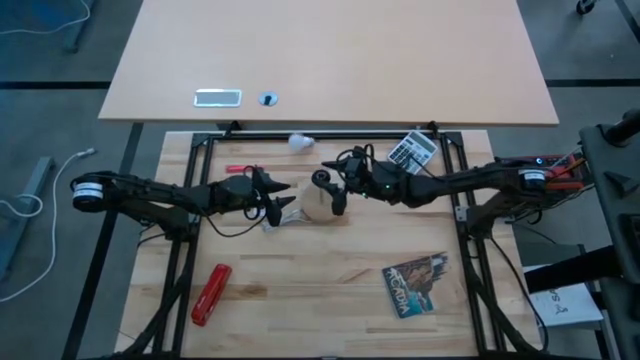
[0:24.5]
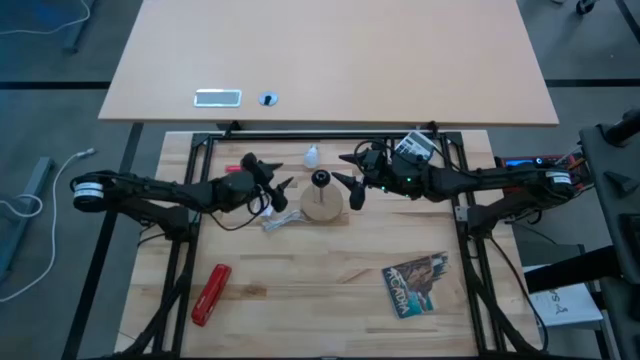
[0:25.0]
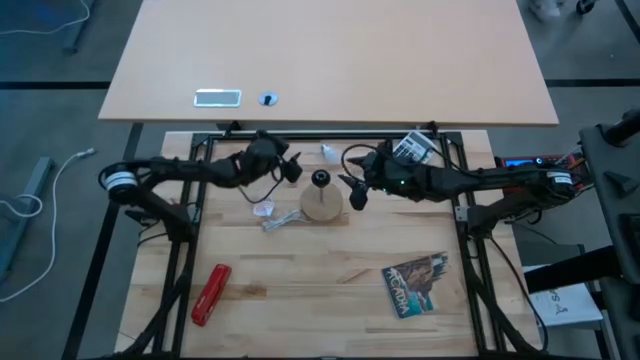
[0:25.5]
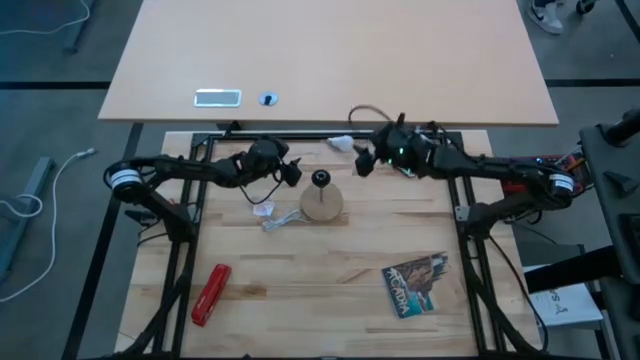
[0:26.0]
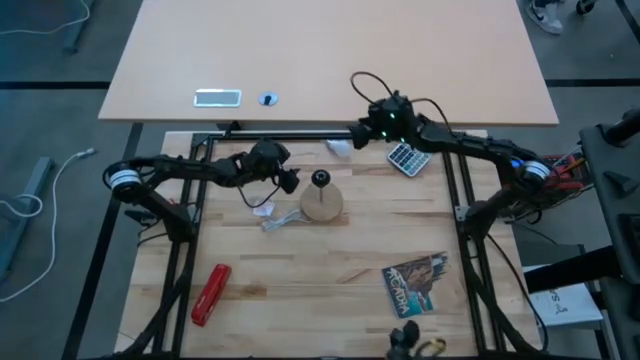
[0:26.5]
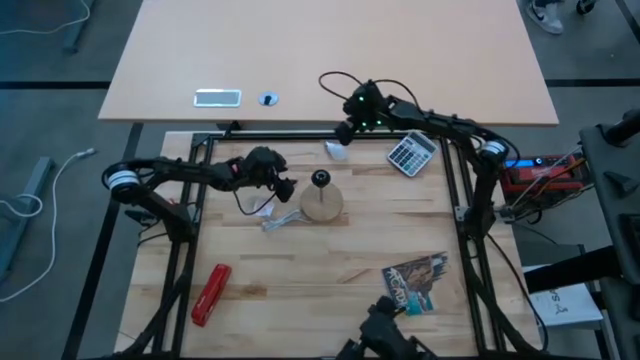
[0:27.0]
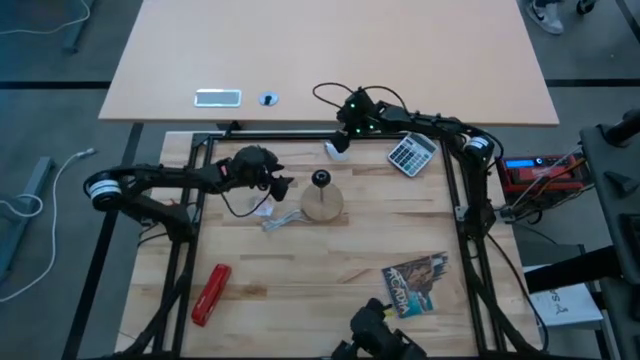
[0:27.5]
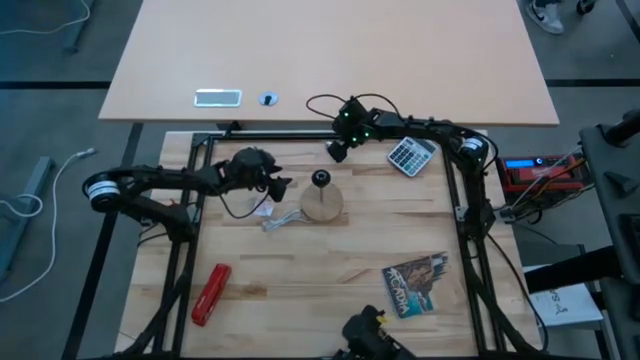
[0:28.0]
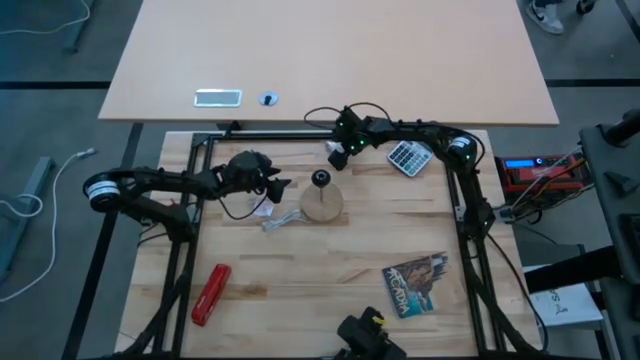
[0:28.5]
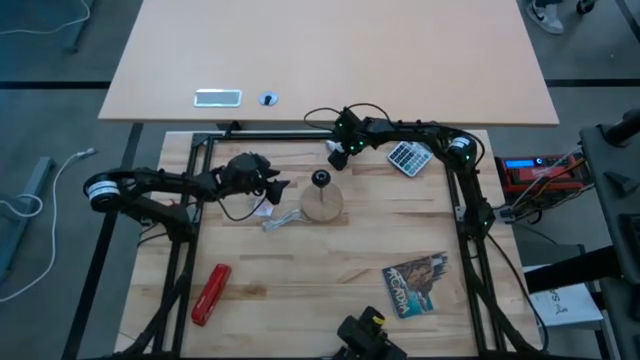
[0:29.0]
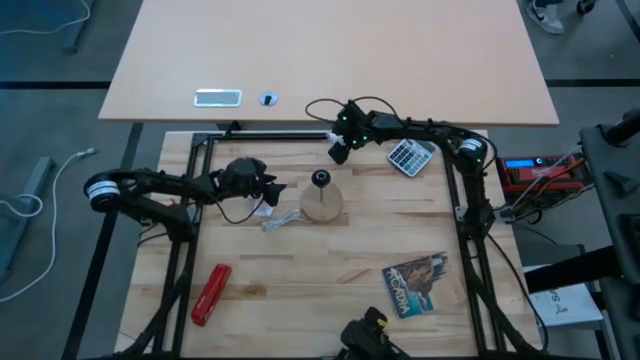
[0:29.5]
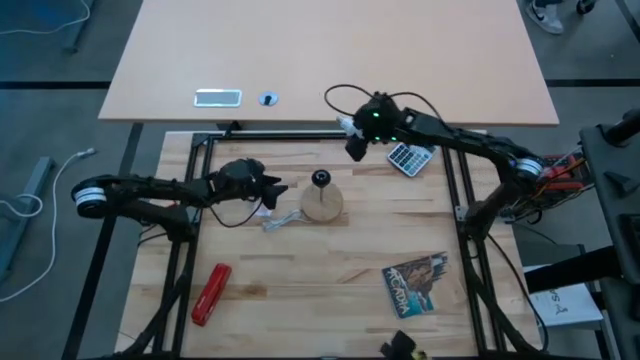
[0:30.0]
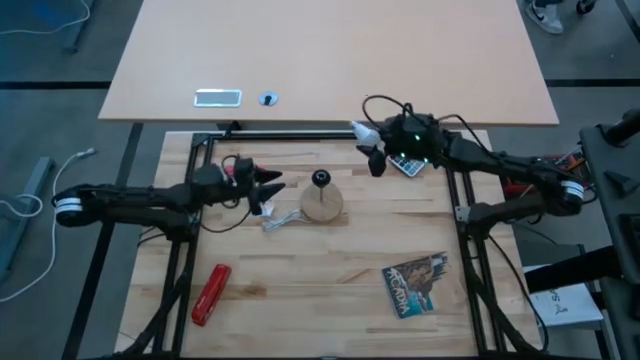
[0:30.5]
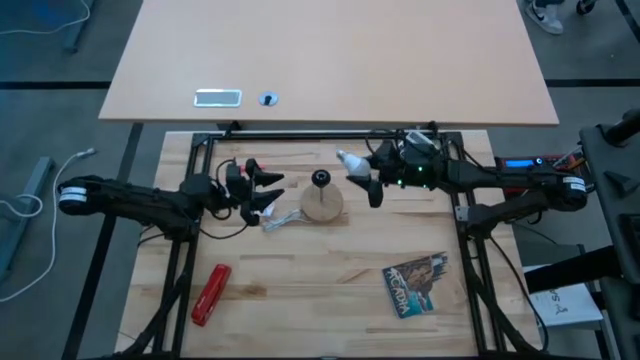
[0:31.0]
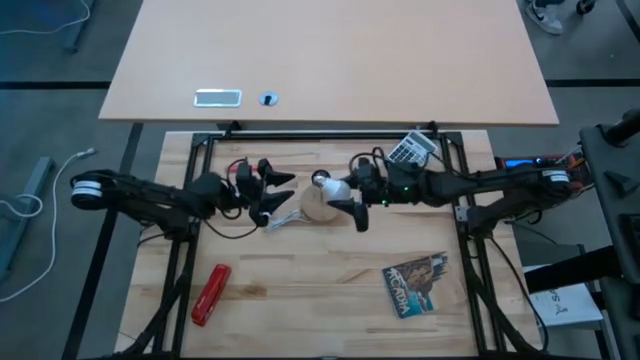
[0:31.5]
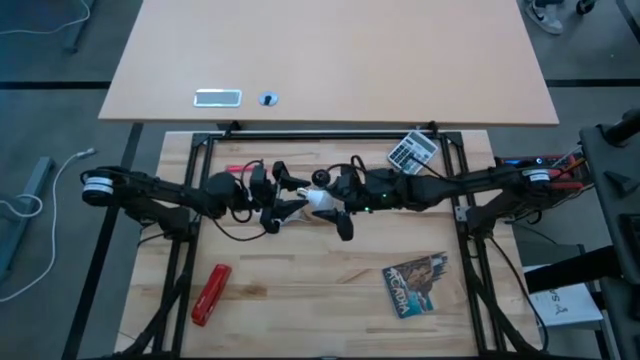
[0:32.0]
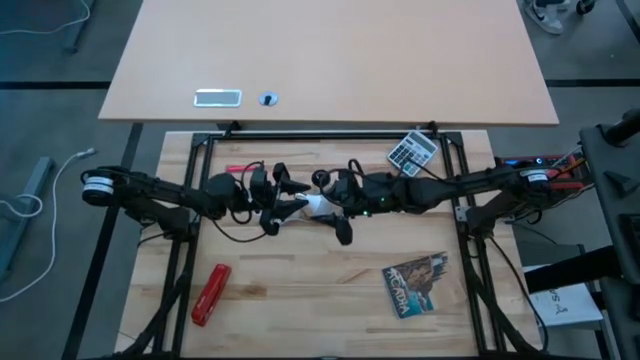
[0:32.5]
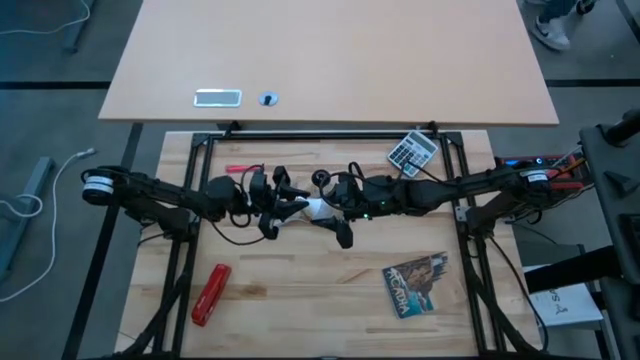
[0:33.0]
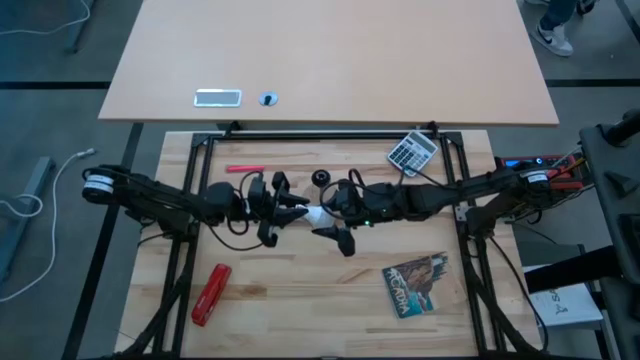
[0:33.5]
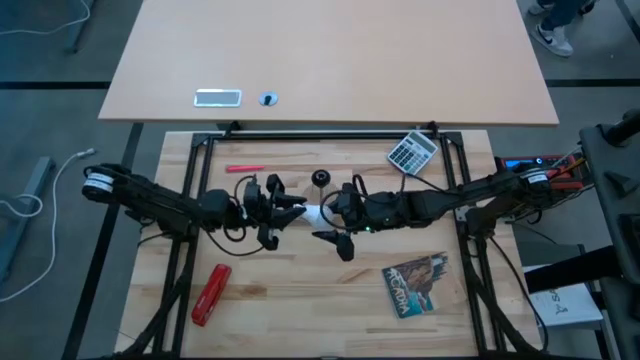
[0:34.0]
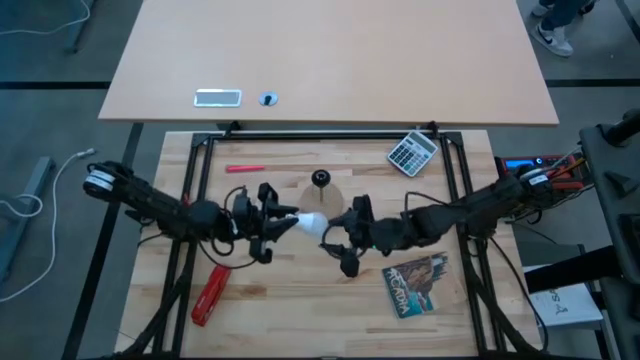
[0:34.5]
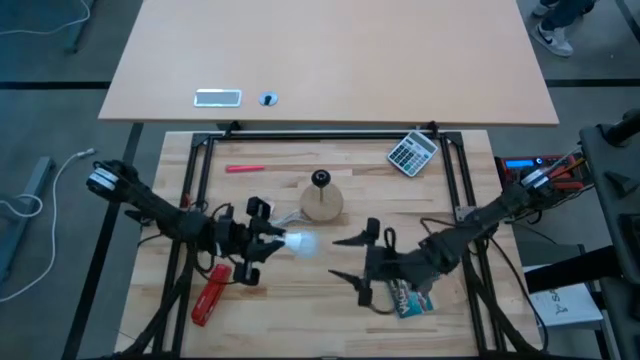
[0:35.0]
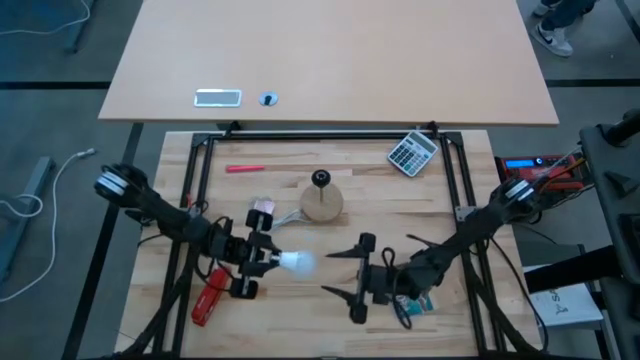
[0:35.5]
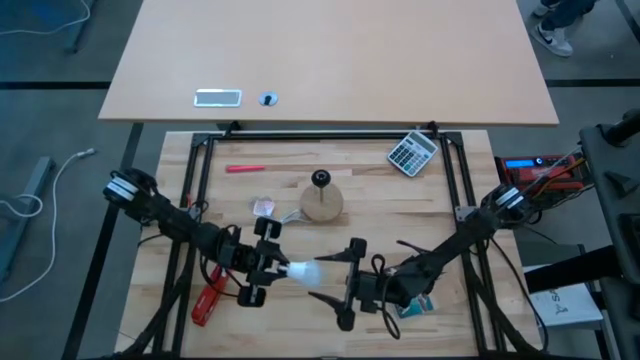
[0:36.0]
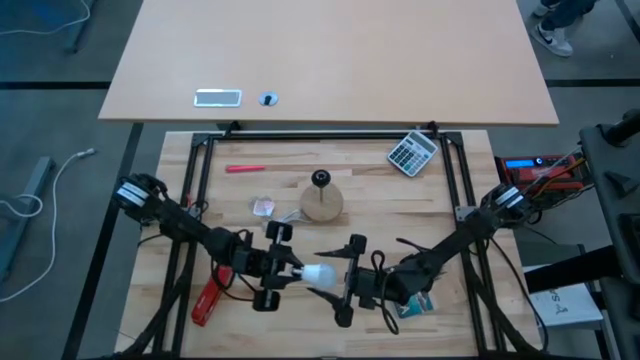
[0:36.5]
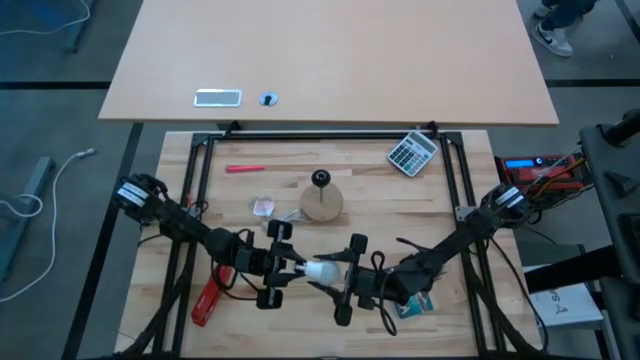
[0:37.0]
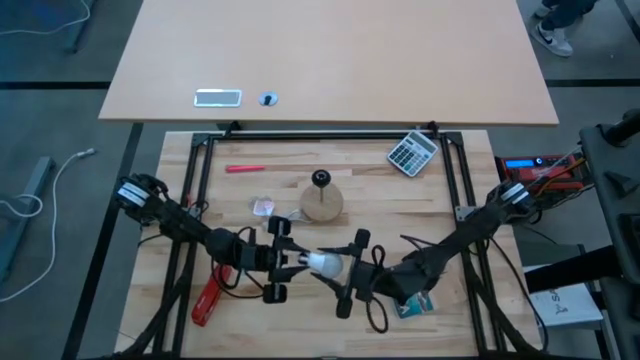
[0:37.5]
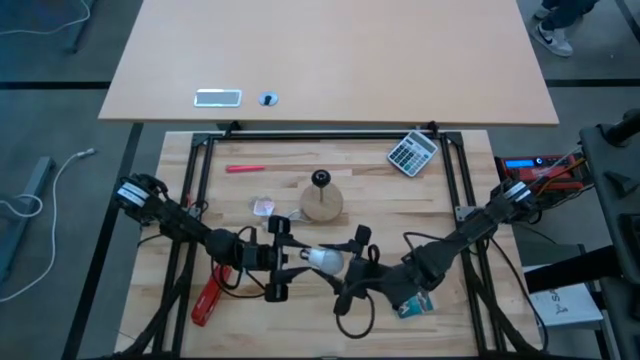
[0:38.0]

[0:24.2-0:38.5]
Task: Screw lightbulb
Insert the lightbulb into the lamp
